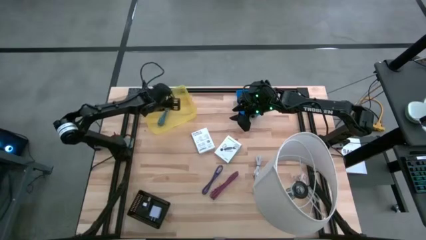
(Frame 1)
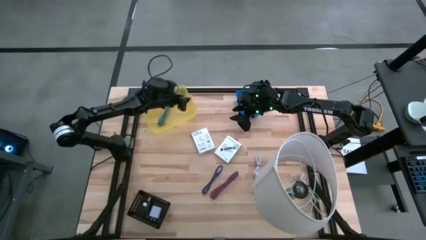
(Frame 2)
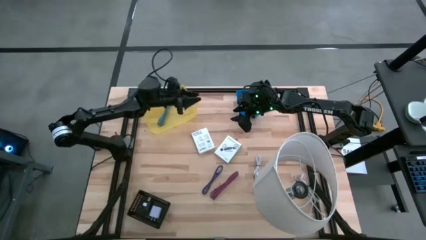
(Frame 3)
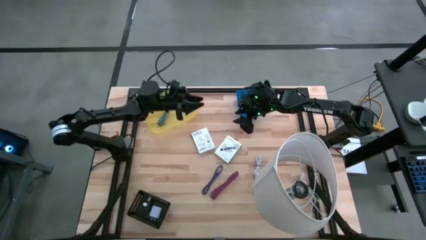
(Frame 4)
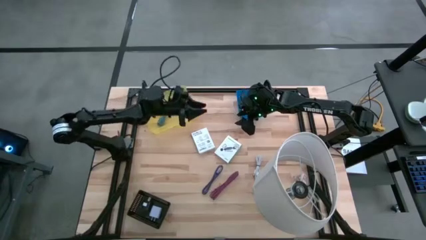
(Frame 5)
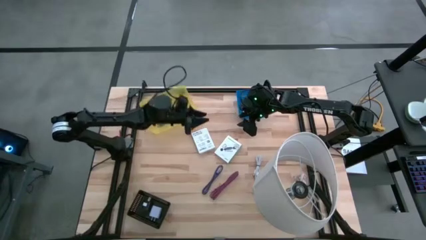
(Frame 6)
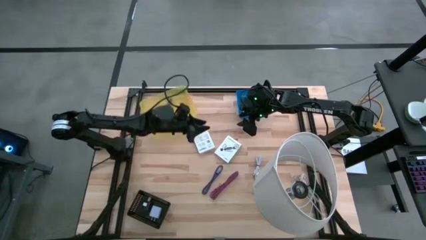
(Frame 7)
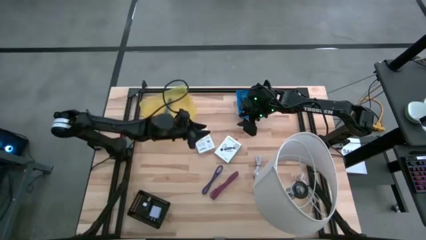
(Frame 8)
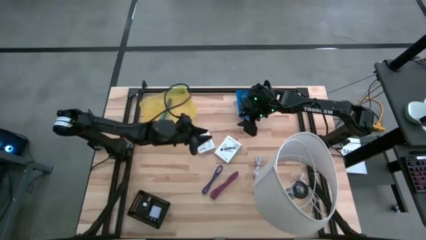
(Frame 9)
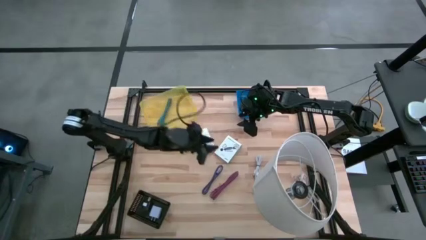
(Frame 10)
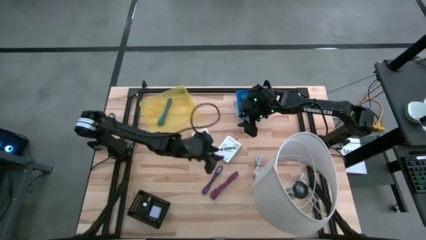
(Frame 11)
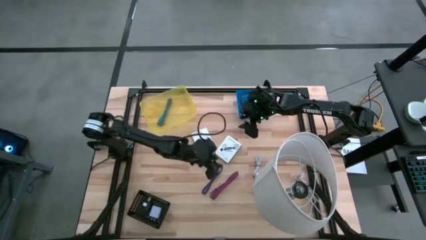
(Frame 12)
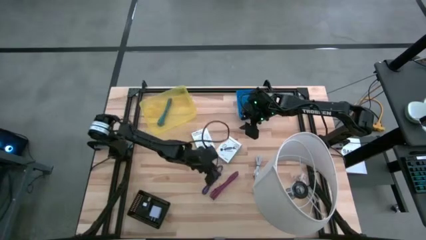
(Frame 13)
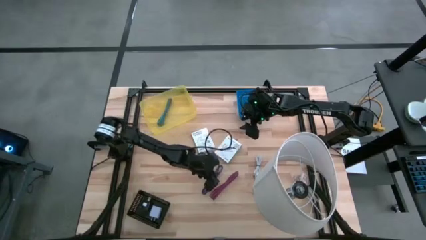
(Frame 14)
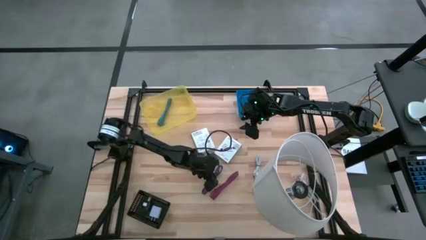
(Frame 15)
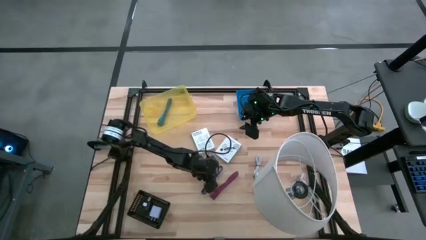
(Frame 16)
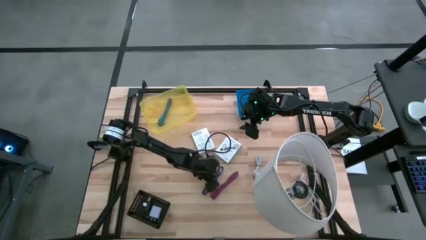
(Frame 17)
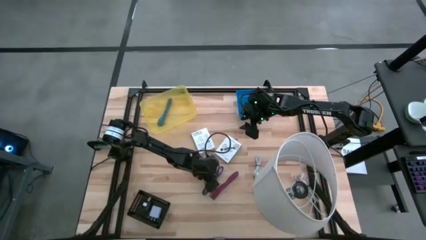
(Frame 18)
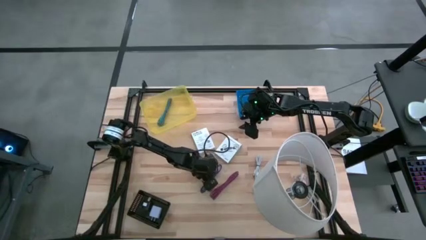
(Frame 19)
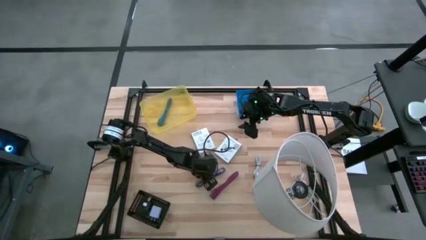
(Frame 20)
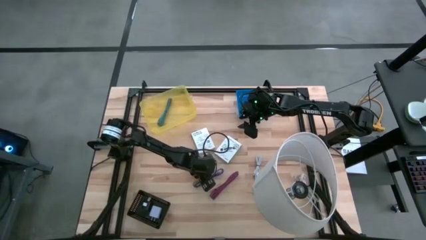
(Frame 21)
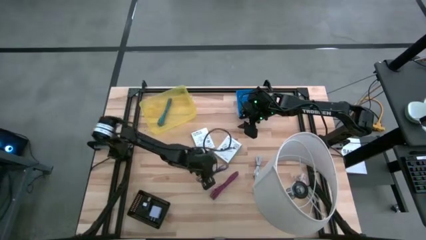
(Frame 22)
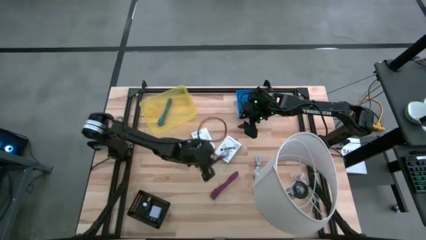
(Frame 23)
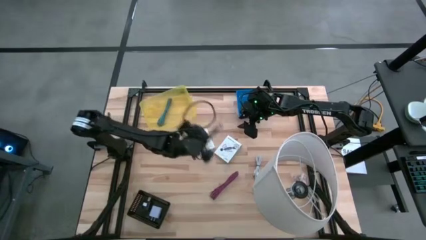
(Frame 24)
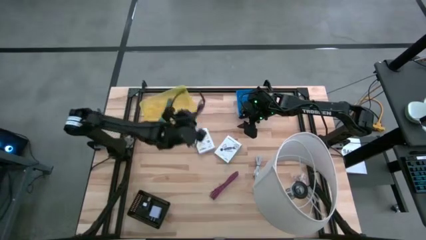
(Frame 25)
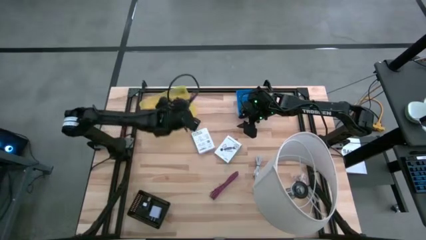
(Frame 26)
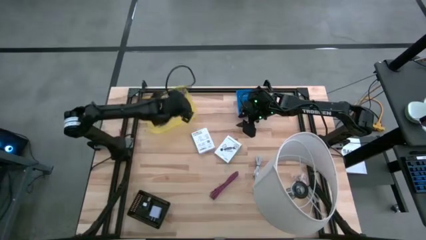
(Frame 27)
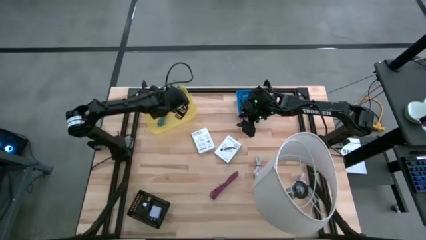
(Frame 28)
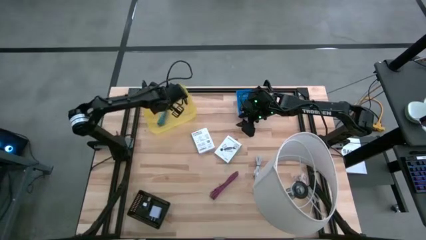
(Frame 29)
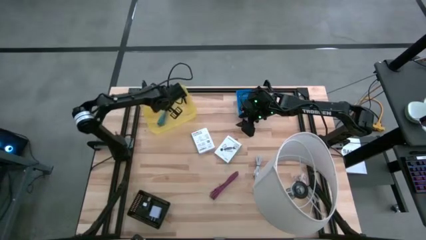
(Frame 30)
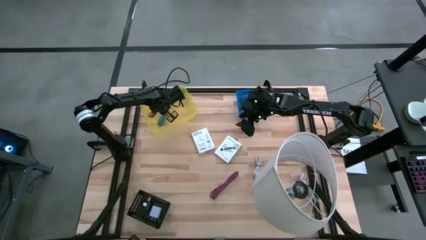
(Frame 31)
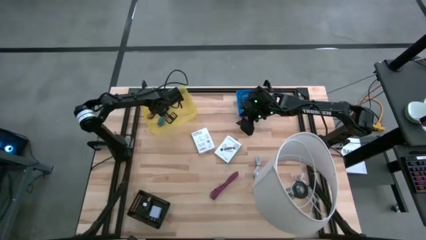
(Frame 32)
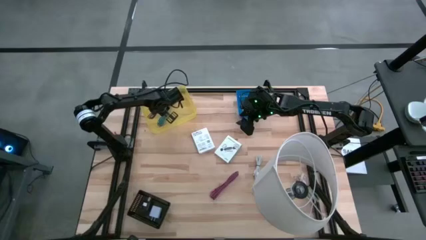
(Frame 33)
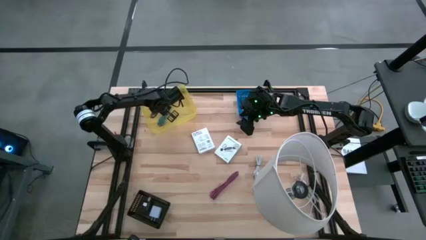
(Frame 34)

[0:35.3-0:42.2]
Task: Pick and place items into bin
Put the dark blue charger cable into the yellow bin

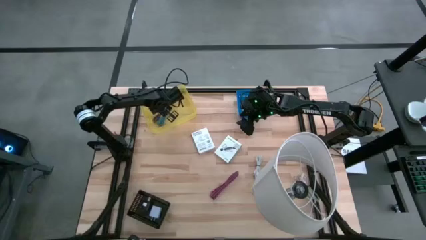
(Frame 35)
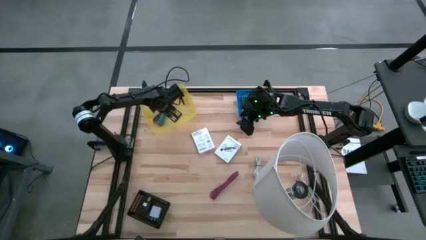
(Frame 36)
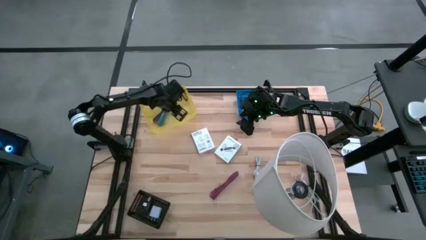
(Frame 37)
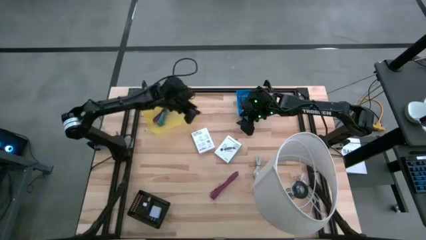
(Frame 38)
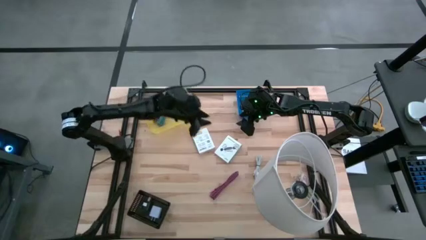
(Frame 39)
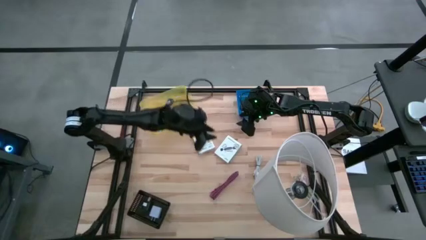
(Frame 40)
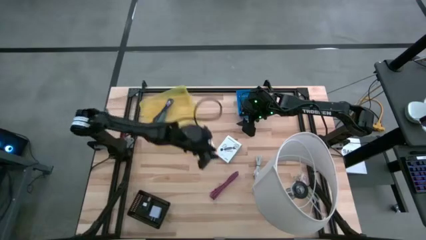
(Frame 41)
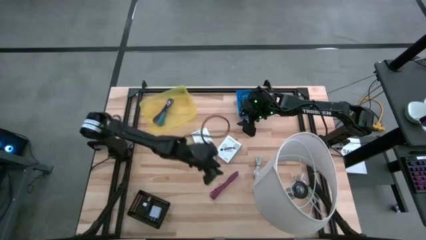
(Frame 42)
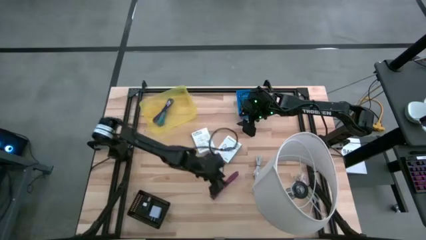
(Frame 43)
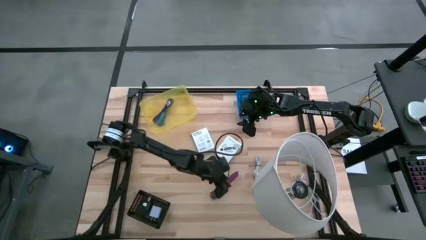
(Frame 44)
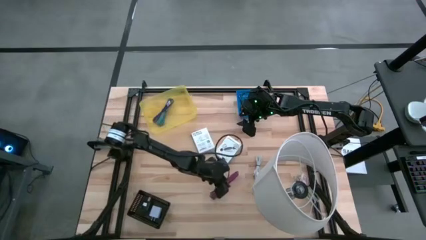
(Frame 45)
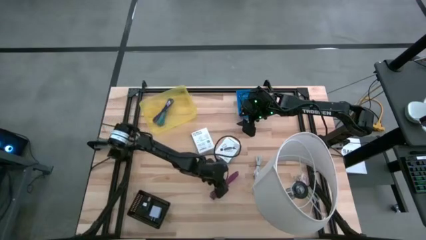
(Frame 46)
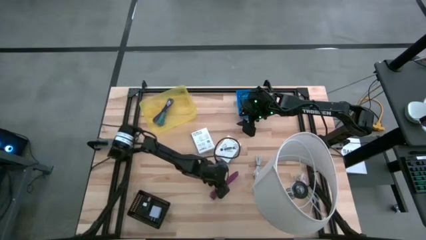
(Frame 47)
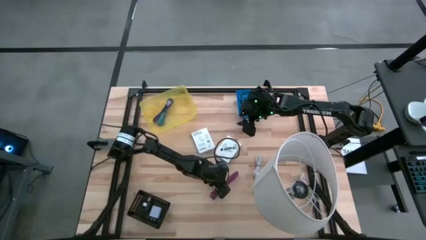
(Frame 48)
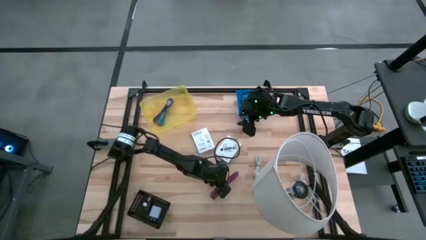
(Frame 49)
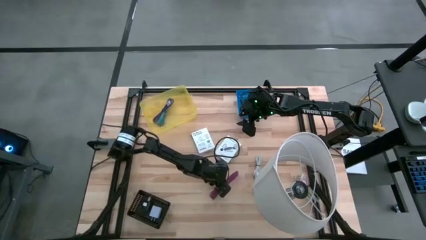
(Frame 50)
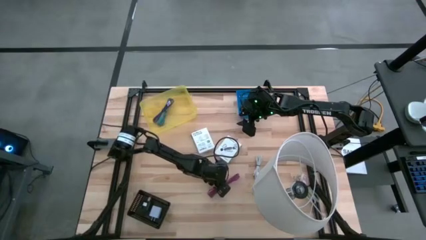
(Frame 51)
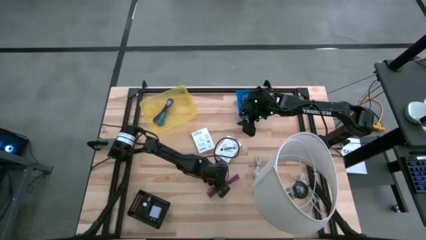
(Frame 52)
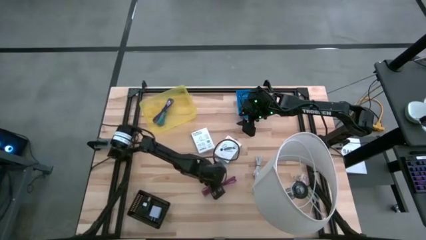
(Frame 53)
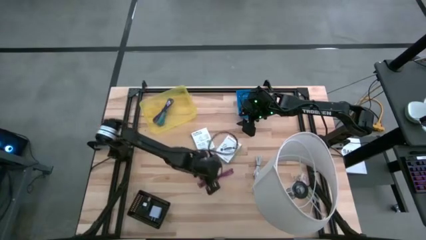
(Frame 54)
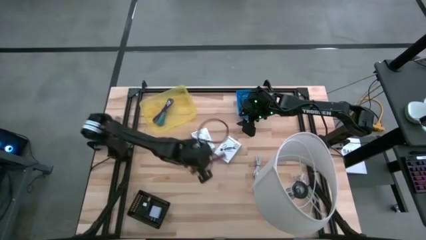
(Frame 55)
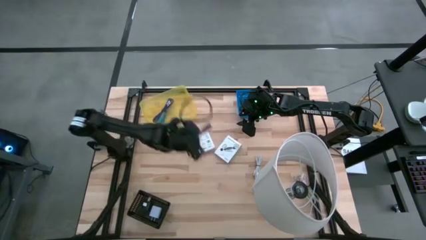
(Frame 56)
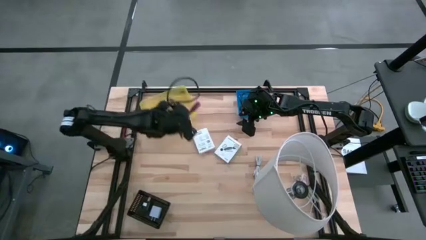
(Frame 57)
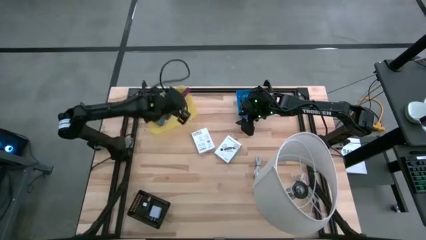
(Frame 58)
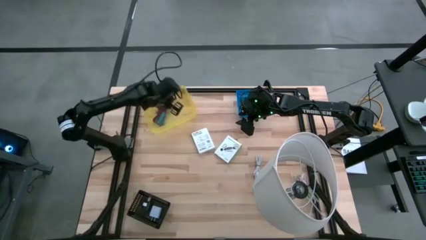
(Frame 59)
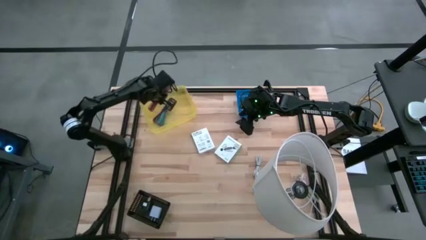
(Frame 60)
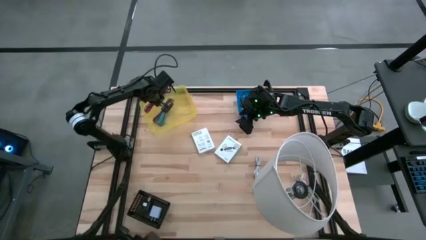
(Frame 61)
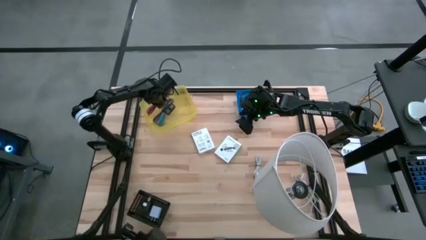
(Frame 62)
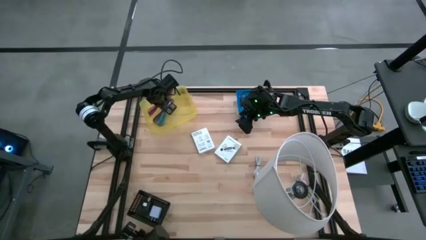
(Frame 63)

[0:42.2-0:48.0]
Put the pink charger cable into the yellow bin

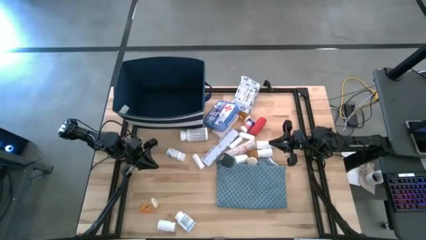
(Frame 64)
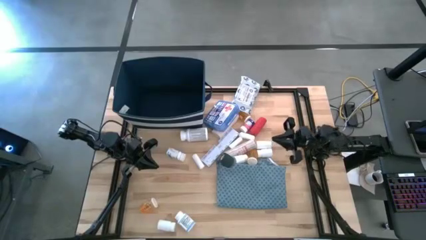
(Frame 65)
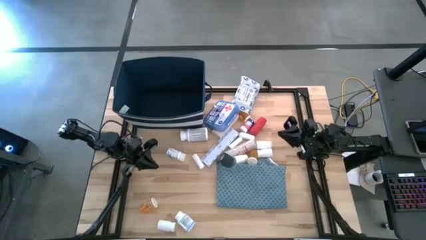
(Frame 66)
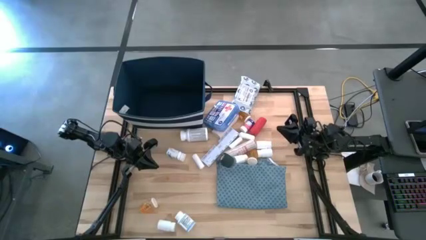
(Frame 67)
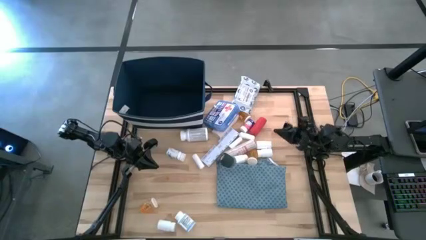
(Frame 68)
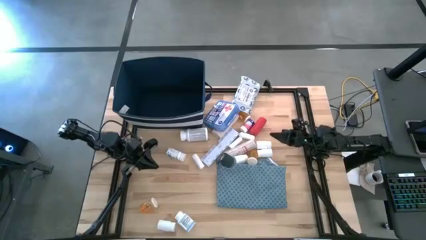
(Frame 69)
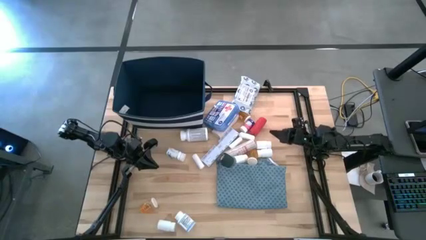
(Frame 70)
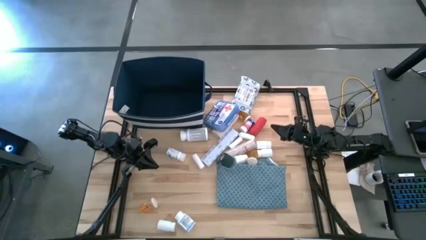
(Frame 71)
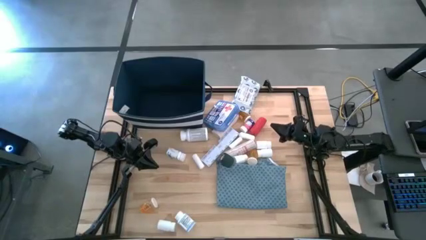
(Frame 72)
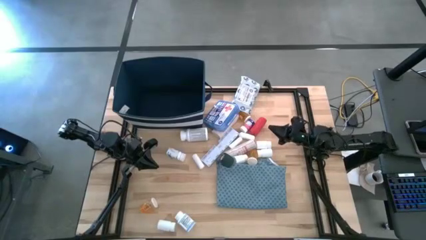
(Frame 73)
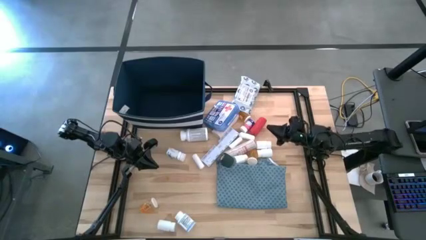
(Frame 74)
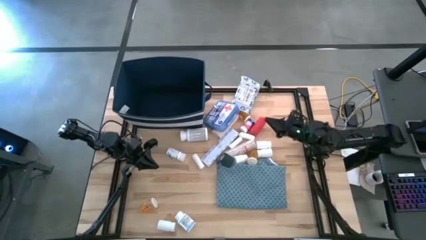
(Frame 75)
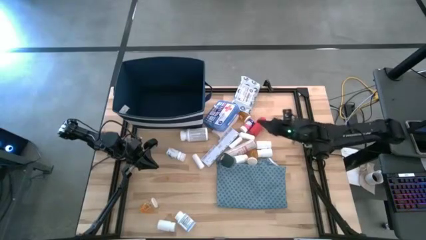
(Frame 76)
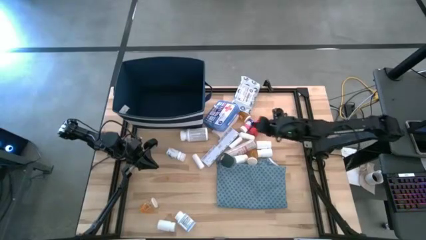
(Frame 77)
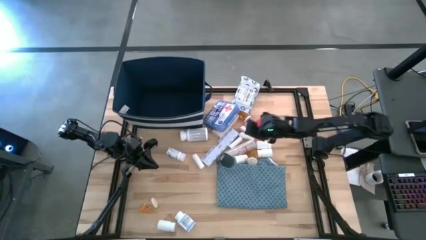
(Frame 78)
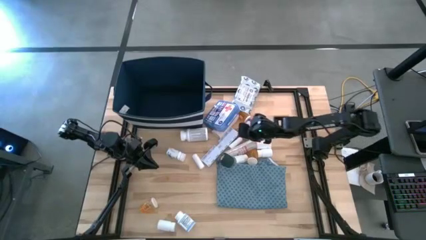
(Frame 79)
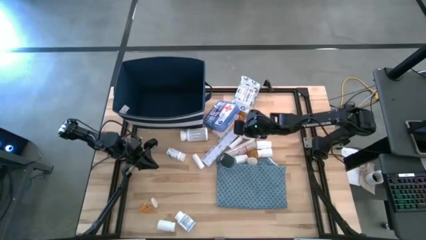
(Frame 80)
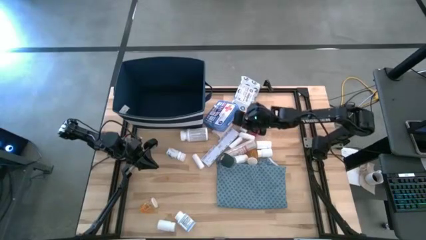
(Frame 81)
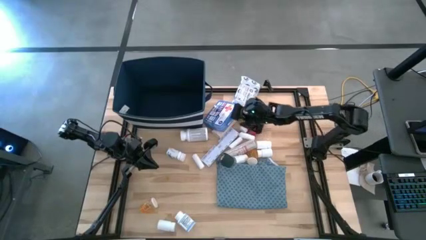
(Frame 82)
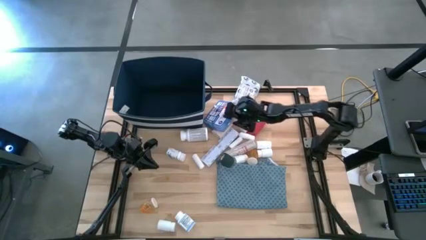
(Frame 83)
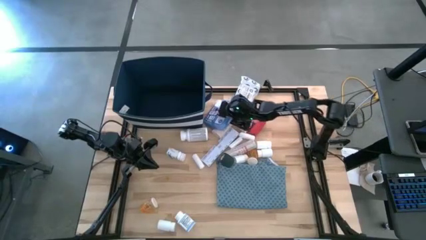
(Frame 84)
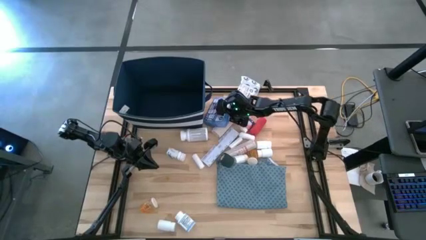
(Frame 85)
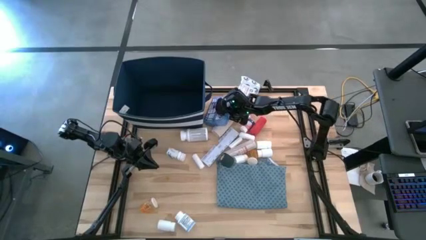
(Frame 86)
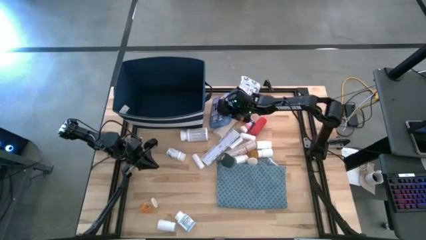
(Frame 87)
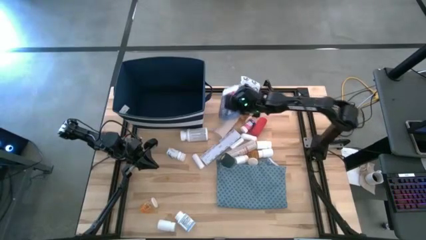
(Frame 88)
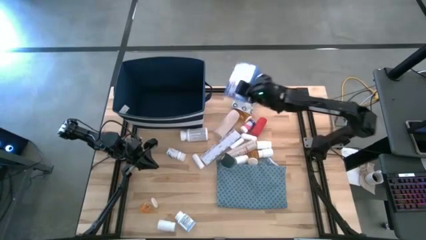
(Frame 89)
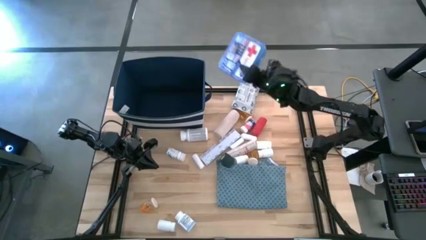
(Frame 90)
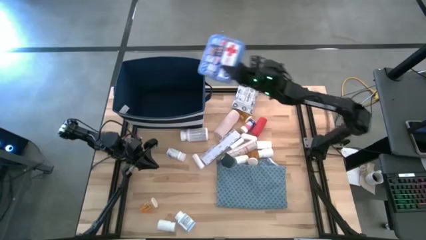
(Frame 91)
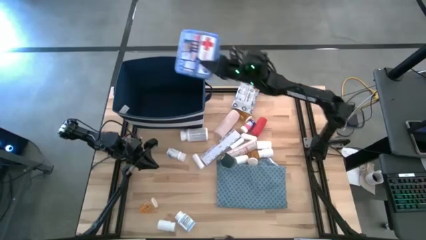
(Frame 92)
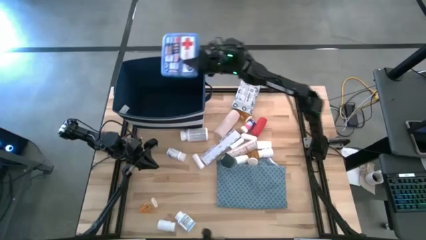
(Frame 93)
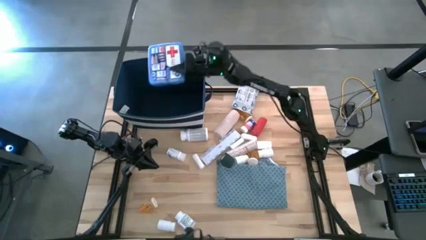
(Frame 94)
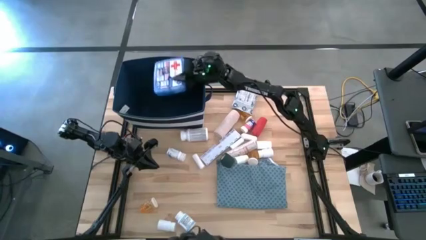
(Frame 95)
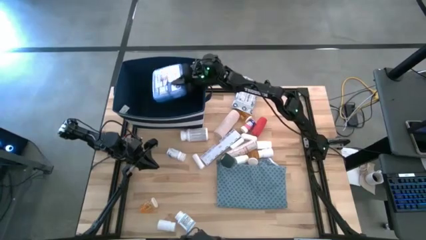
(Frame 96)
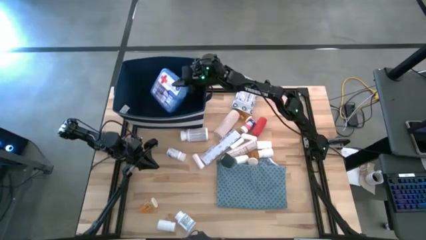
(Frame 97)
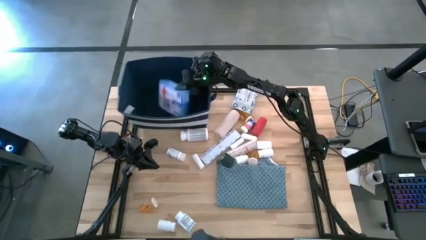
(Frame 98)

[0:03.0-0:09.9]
Task: Pick & place medical supplies in basket/bin
Put the blue first aid box into the blue bin
